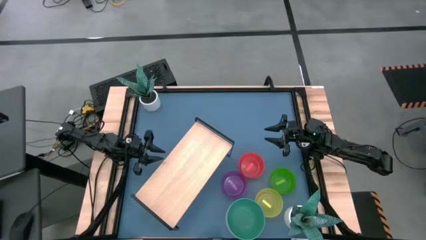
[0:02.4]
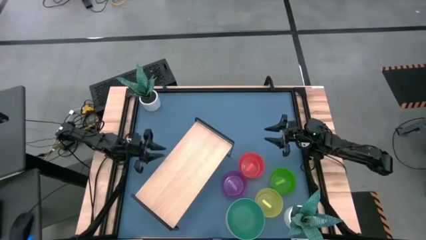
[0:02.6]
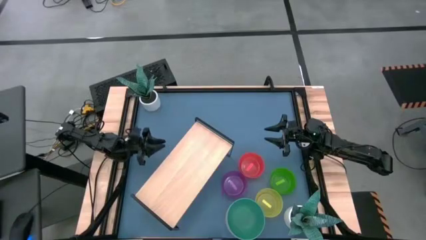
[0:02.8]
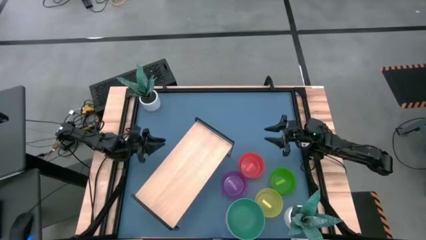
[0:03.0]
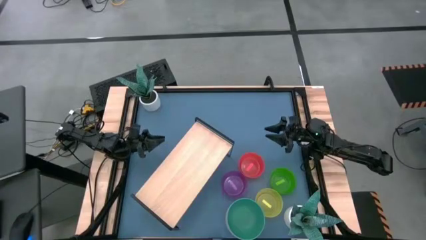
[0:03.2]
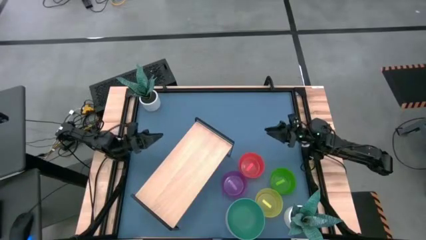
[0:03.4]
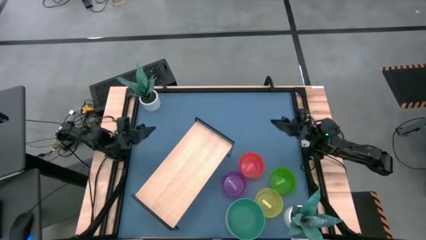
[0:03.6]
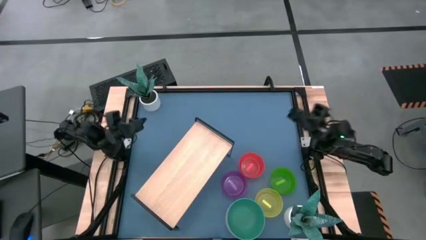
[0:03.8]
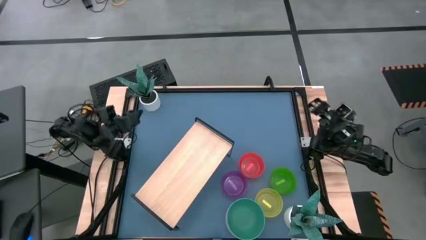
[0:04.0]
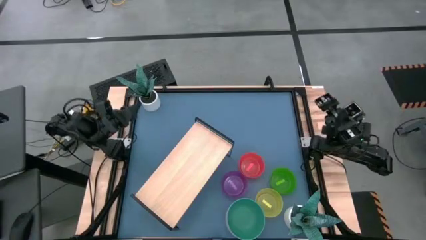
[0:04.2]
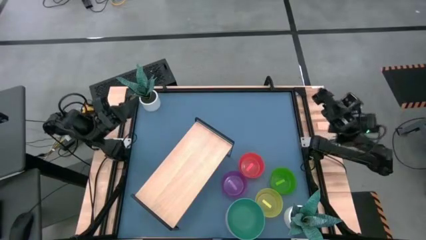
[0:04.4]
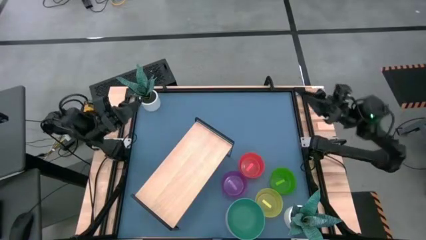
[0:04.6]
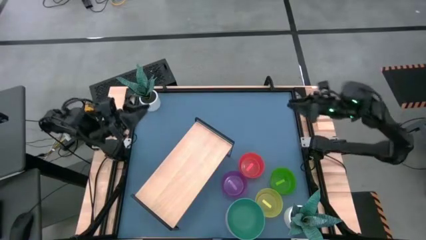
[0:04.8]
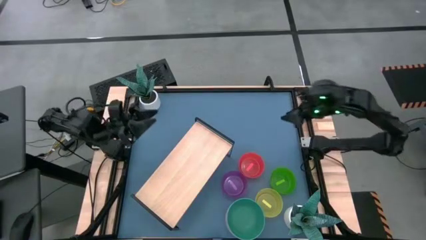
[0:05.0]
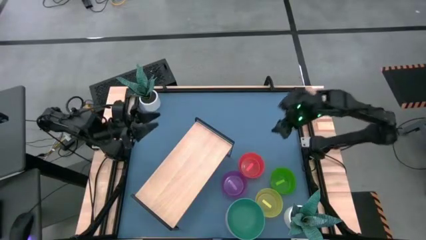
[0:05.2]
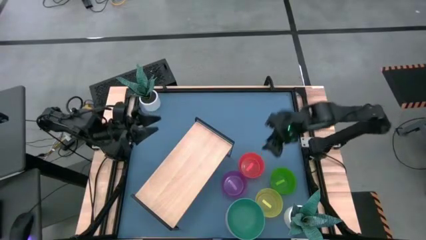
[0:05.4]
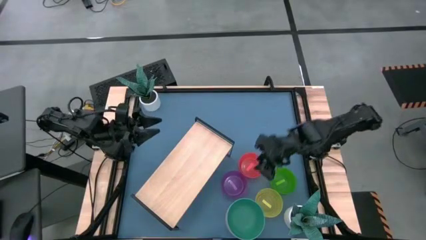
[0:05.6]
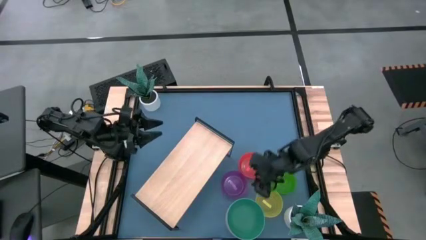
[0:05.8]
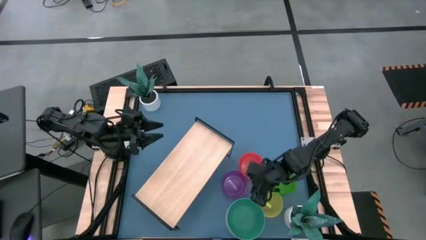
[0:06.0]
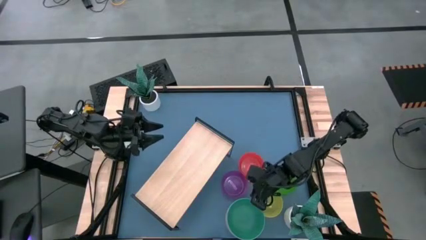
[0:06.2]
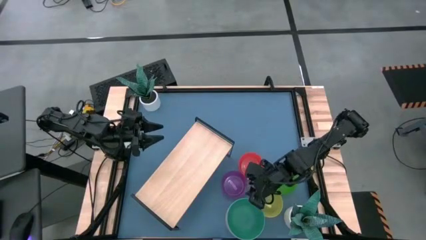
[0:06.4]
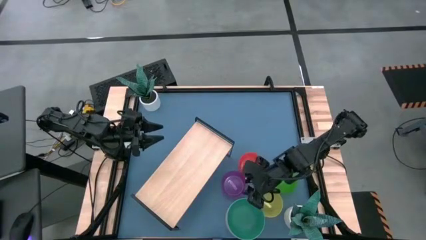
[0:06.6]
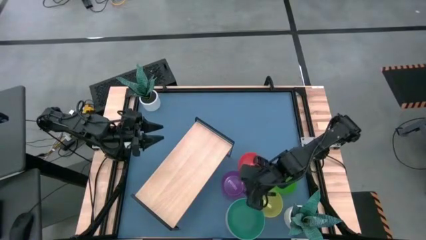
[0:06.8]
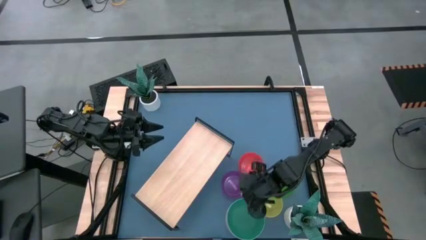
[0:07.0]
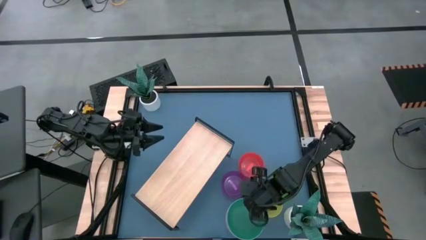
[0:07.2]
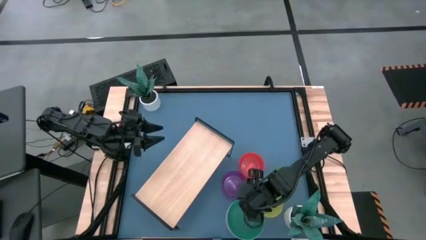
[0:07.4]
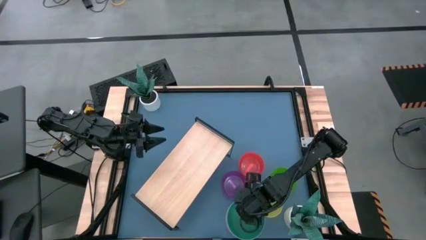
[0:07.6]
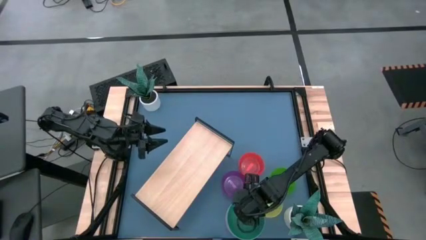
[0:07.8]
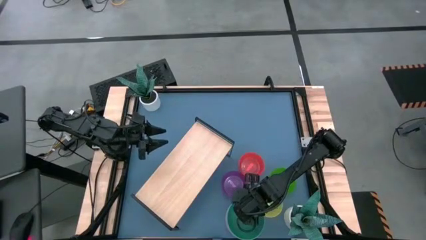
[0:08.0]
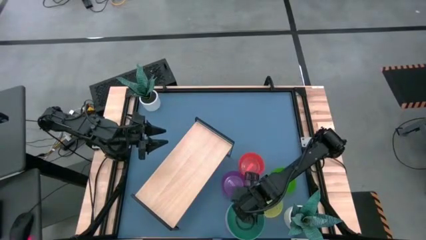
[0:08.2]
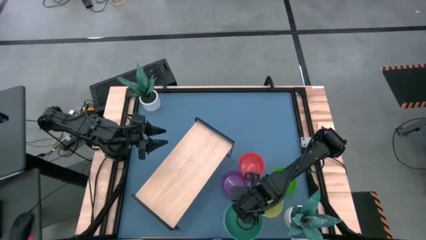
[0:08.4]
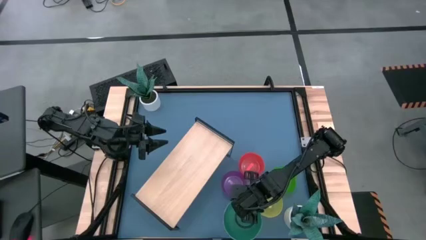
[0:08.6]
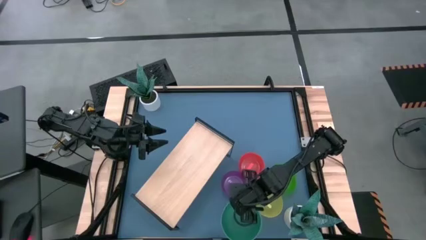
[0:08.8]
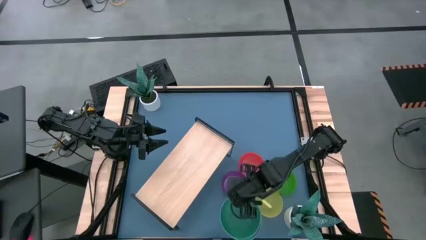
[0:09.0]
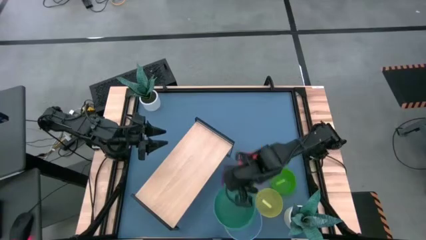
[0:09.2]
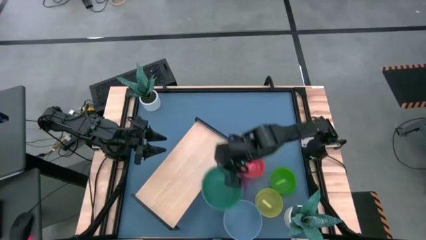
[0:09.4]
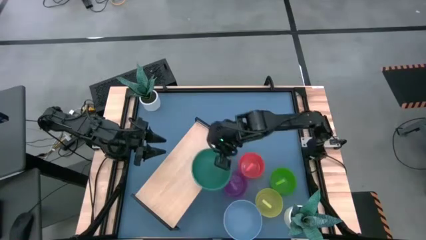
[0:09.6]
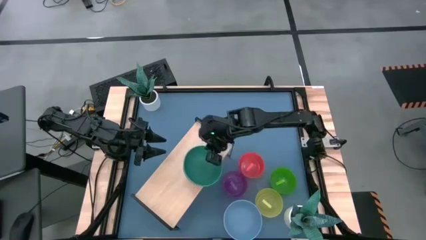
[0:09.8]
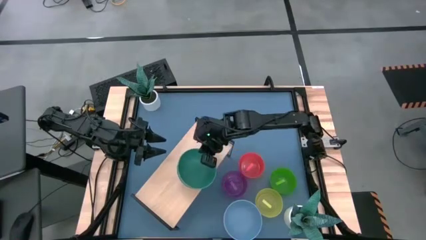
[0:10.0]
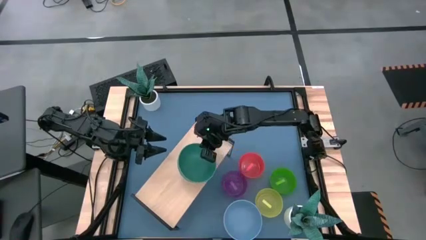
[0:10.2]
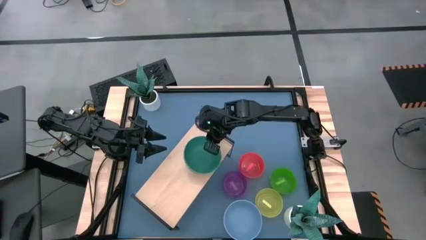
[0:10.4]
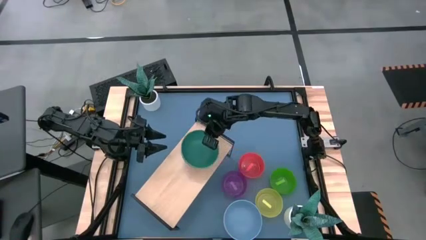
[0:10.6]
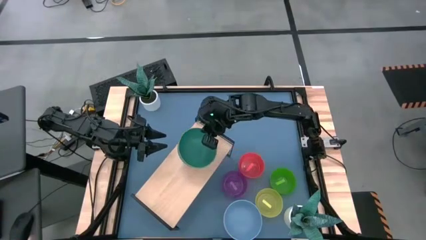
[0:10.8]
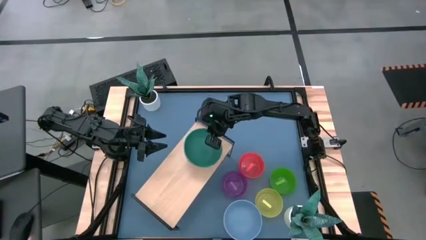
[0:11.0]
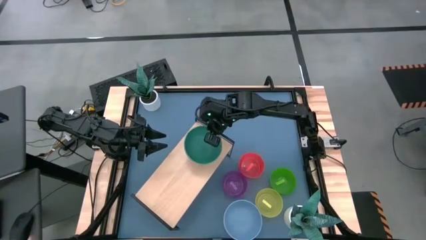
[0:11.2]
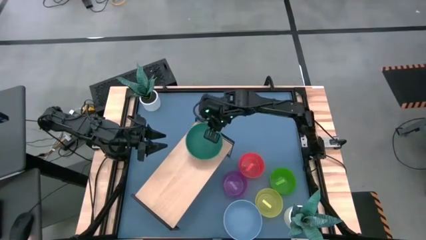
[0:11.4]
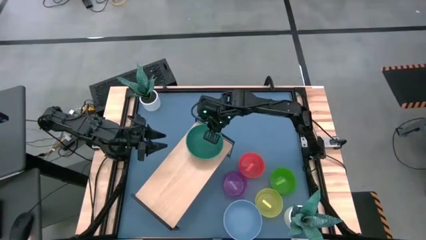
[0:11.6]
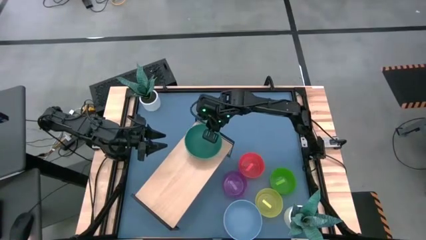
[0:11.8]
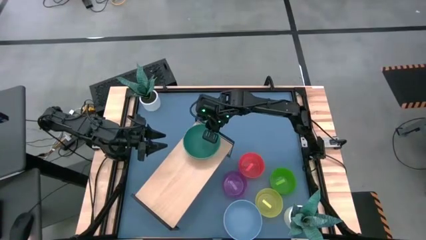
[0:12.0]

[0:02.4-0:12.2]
Task: Place and stack bowls onto a shelf
Put the green bowl on the shelf

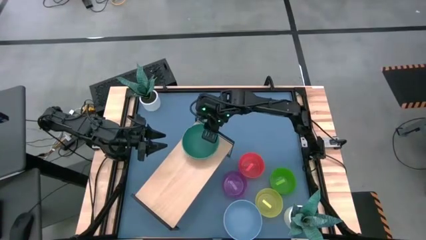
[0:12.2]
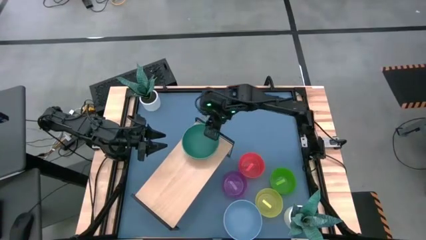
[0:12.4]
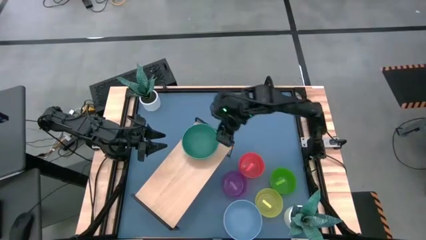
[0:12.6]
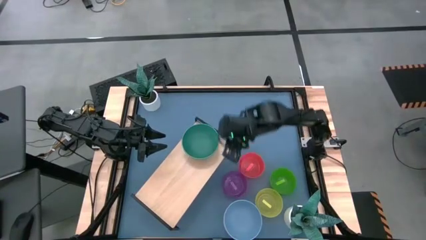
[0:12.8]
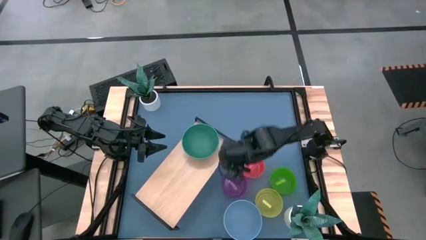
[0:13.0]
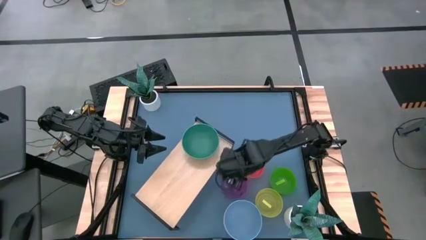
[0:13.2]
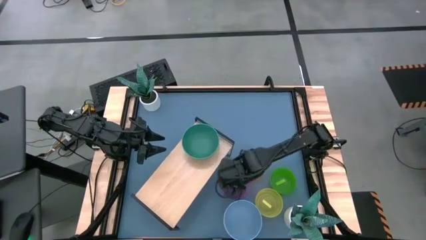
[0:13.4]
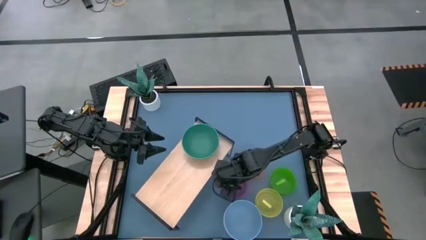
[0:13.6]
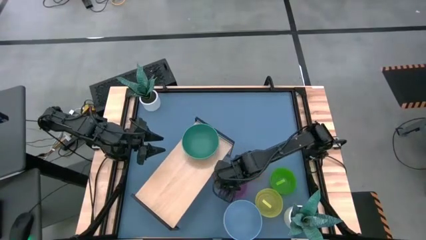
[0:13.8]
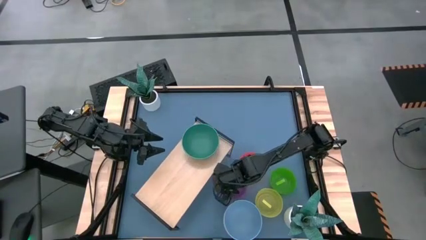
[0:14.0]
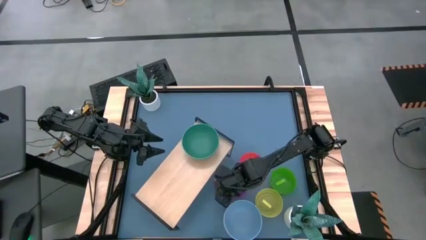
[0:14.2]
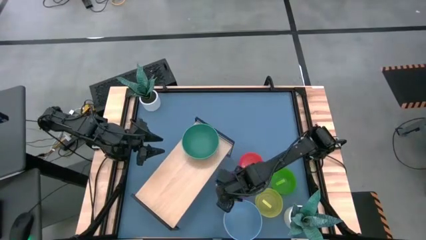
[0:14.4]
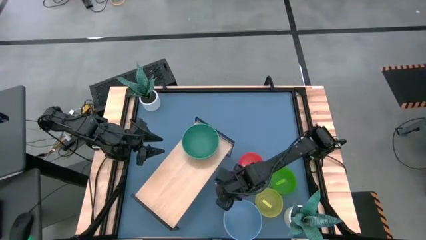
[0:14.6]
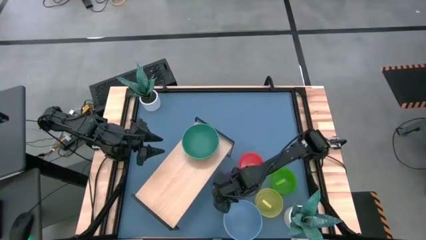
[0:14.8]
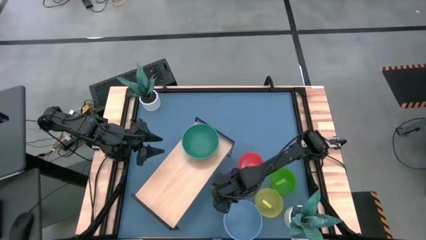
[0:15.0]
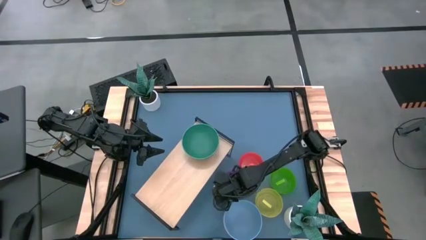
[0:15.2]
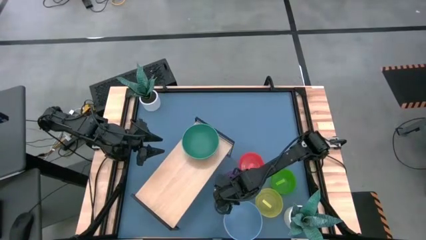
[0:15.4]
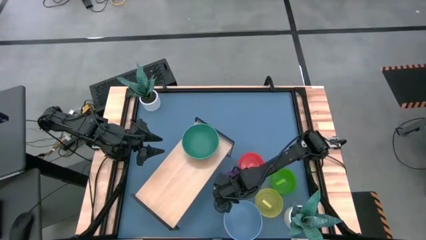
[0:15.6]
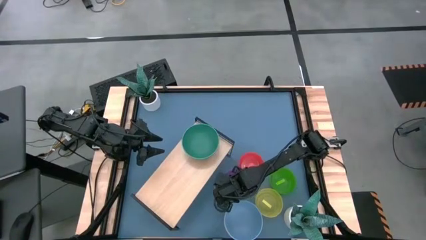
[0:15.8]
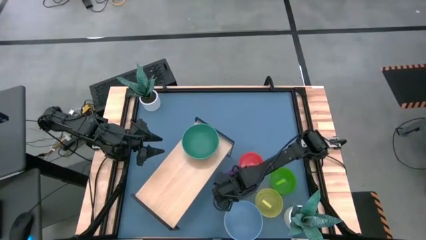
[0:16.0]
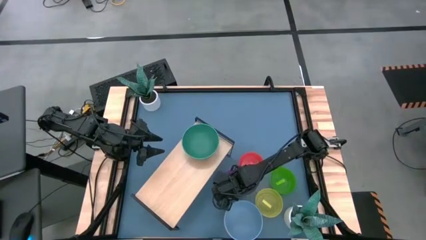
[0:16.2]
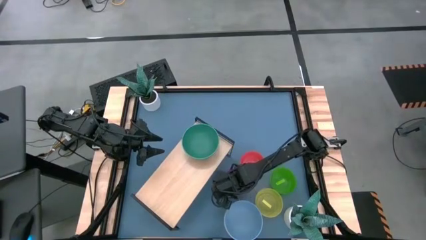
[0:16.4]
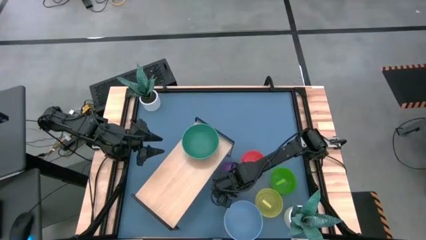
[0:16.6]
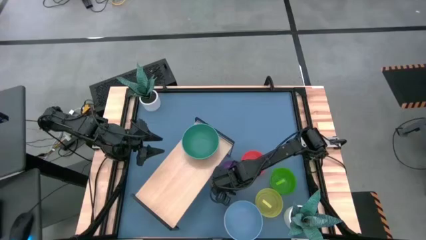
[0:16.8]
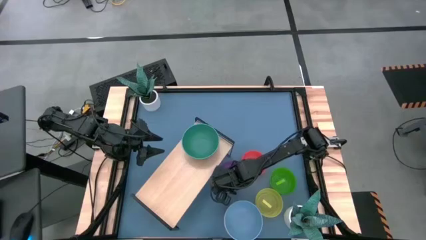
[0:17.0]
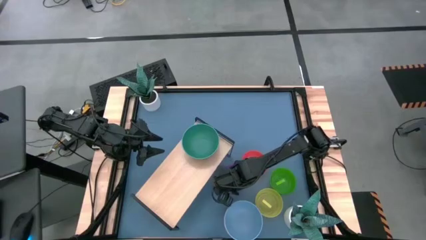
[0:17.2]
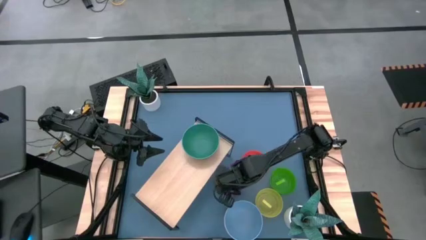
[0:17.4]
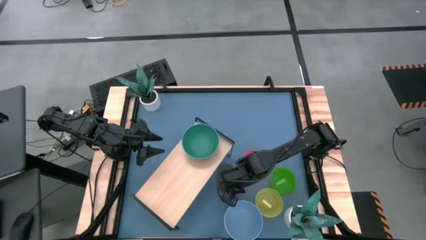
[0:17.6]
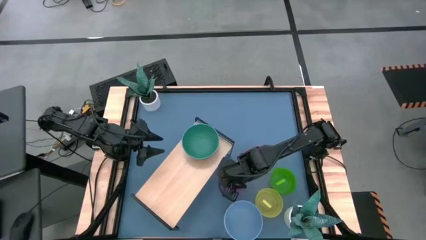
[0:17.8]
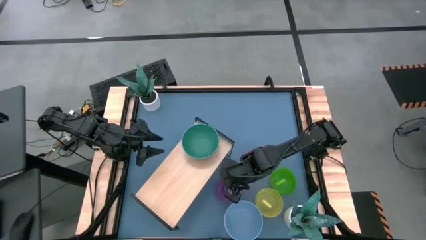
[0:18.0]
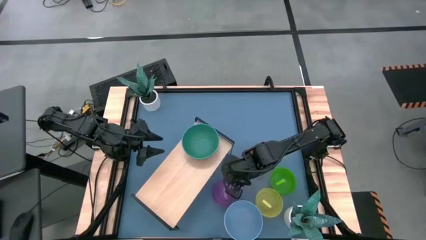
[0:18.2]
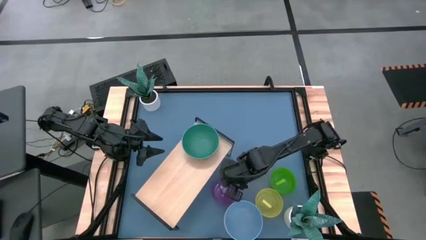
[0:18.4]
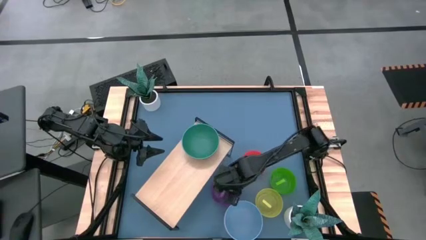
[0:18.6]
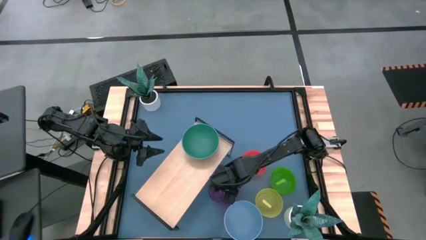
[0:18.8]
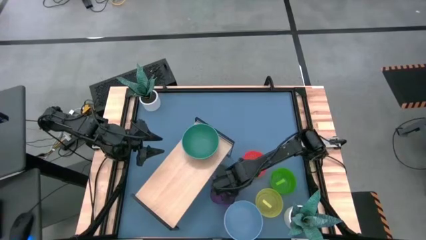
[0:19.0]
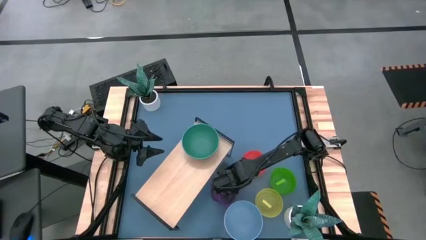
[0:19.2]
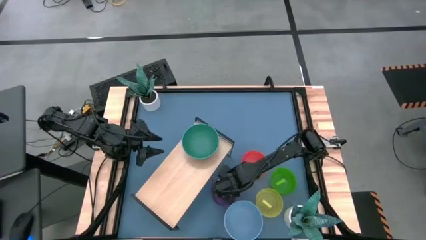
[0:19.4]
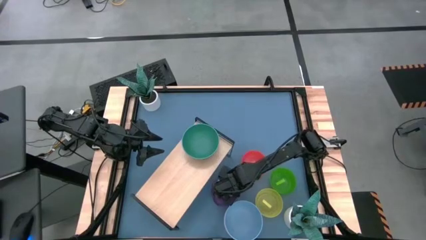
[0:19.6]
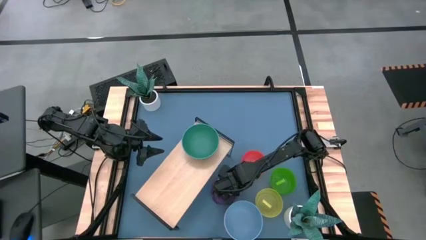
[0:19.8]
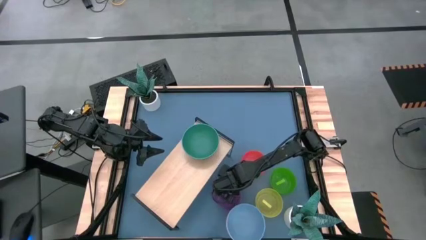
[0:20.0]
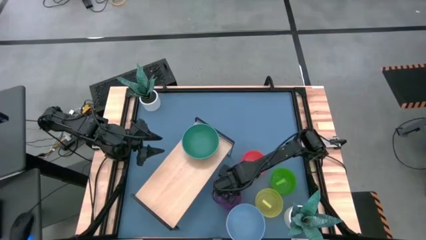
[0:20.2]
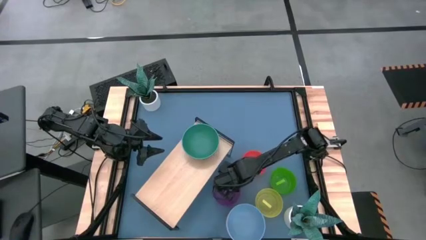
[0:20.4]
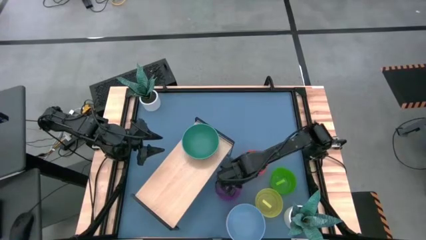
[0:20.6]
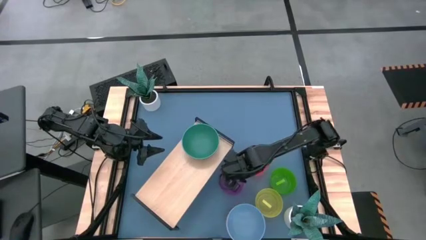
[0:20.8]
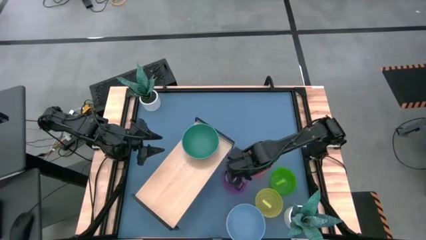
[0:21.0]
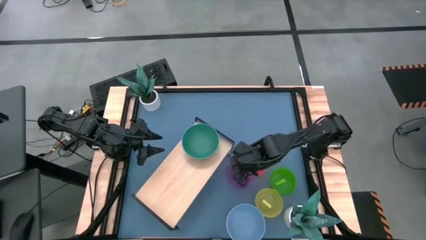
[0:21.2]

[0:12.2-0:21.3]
Put the light violet bowl on the shelf
